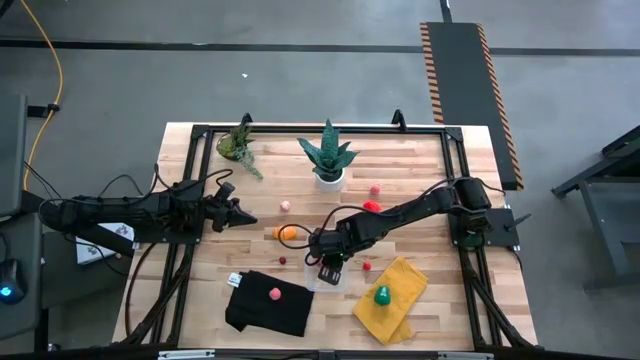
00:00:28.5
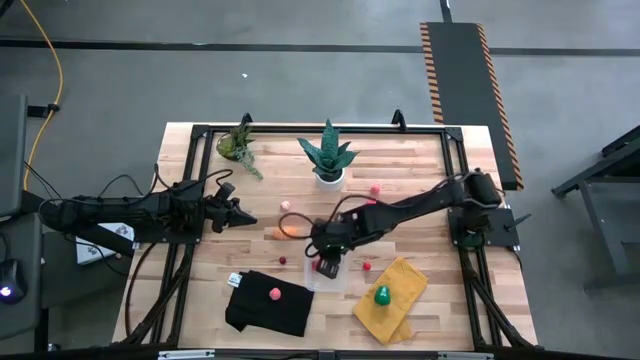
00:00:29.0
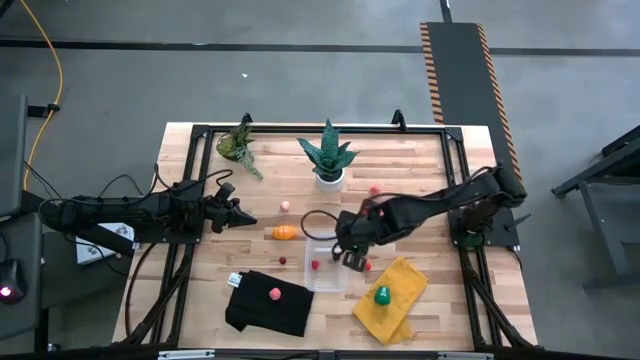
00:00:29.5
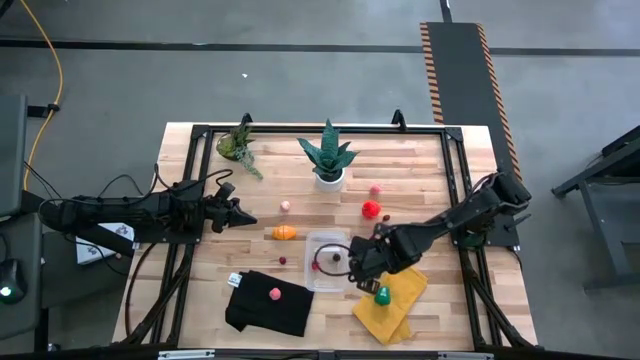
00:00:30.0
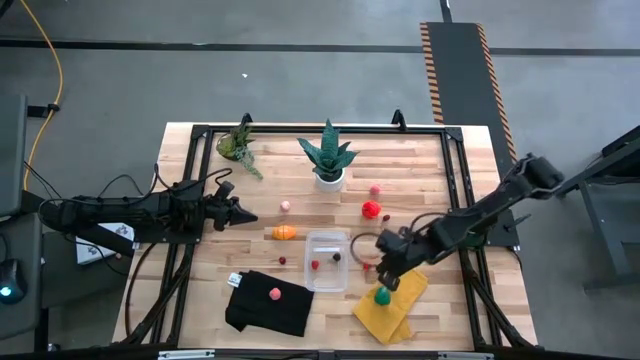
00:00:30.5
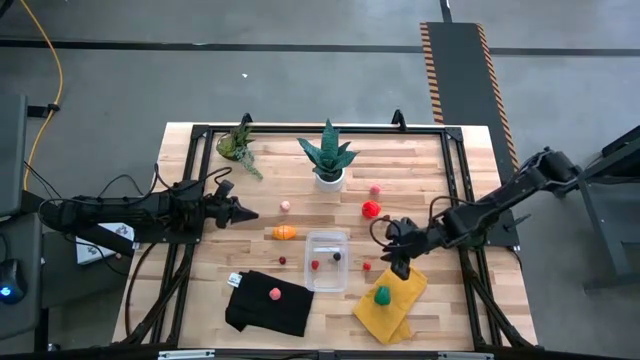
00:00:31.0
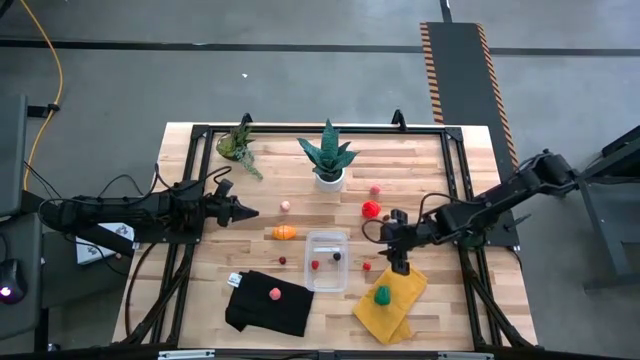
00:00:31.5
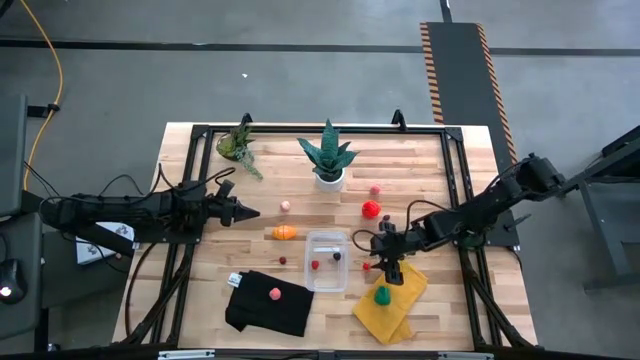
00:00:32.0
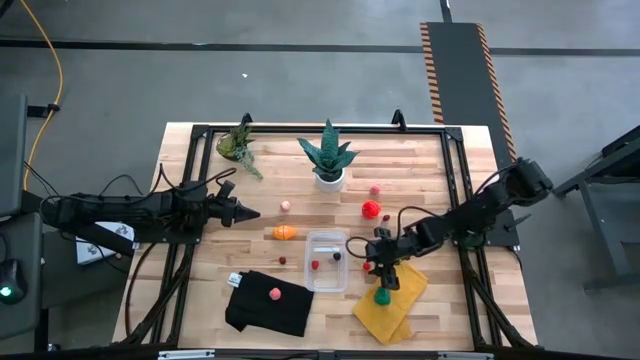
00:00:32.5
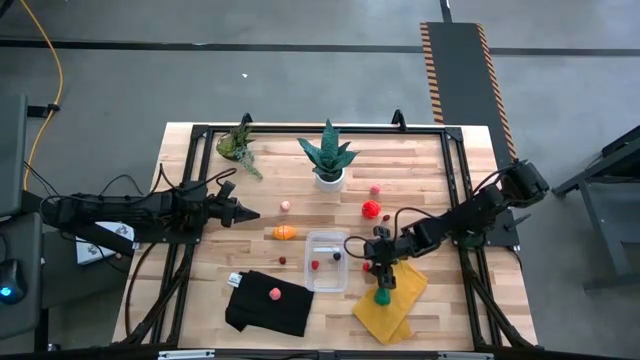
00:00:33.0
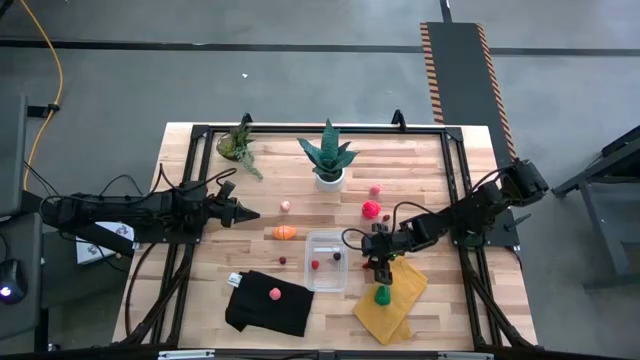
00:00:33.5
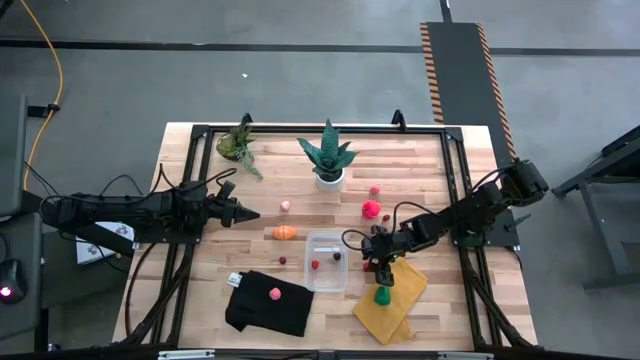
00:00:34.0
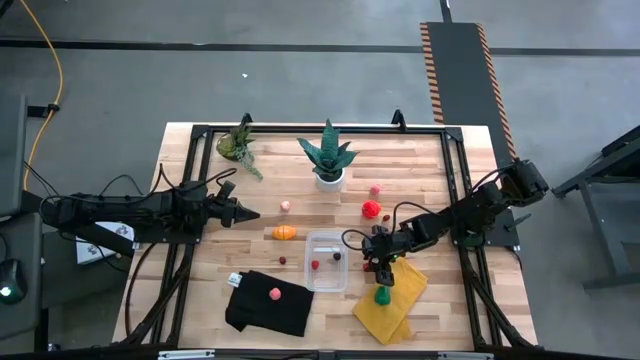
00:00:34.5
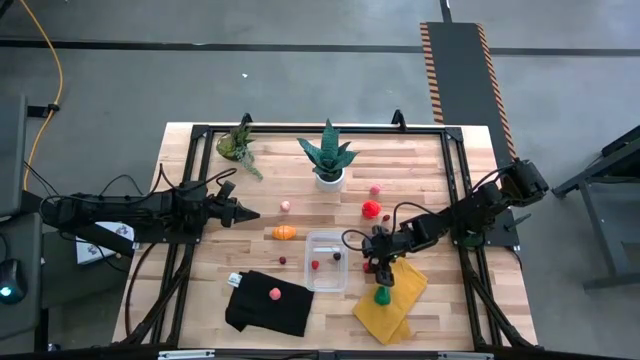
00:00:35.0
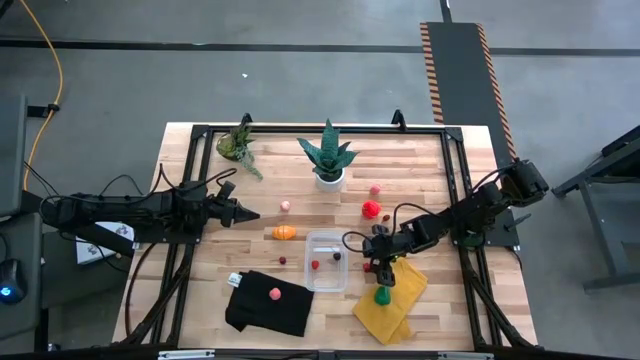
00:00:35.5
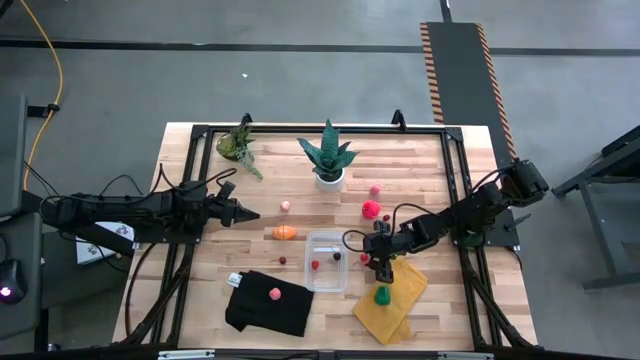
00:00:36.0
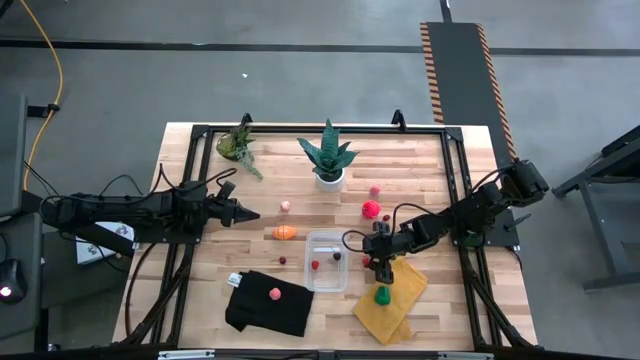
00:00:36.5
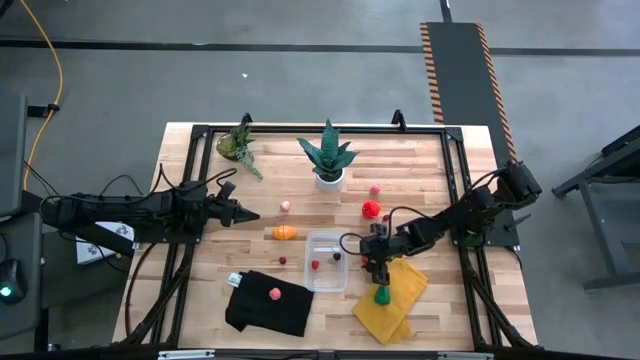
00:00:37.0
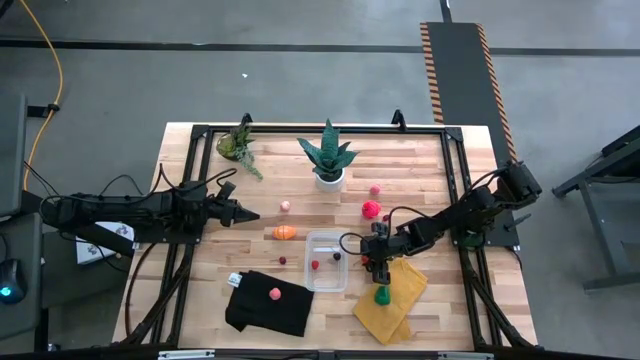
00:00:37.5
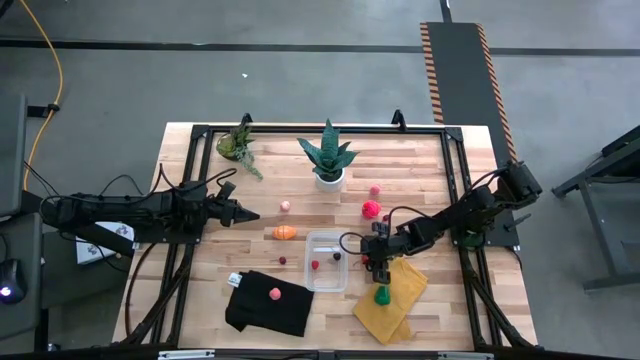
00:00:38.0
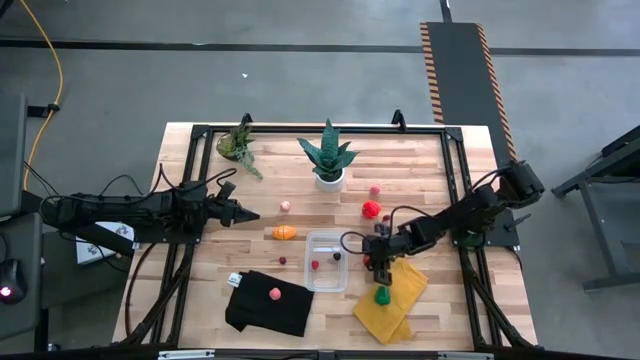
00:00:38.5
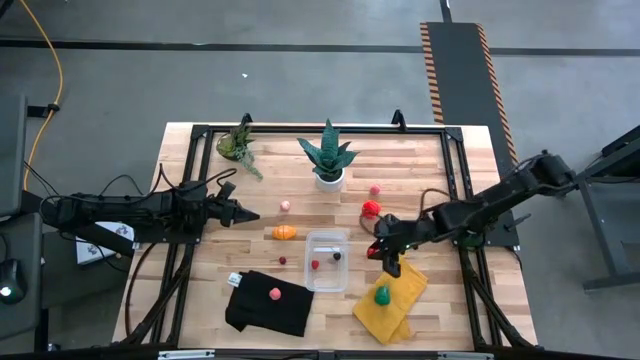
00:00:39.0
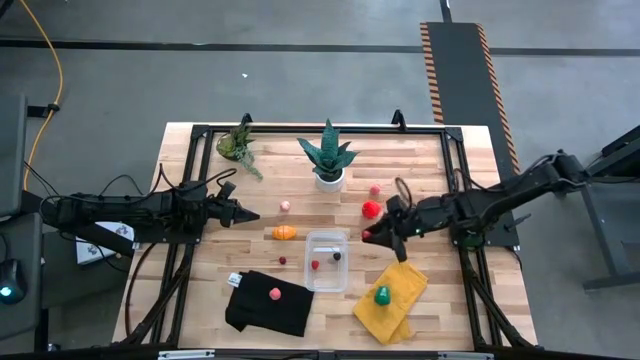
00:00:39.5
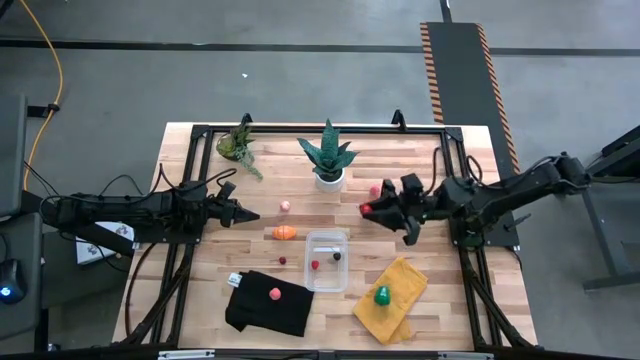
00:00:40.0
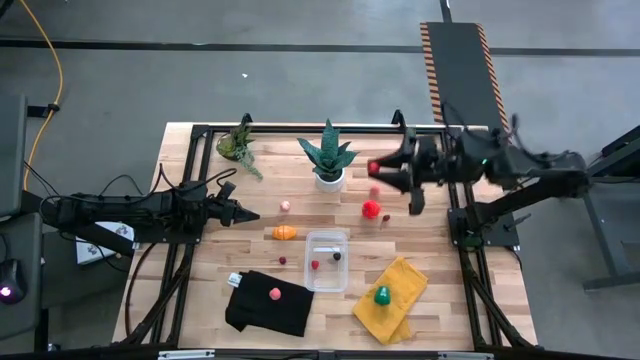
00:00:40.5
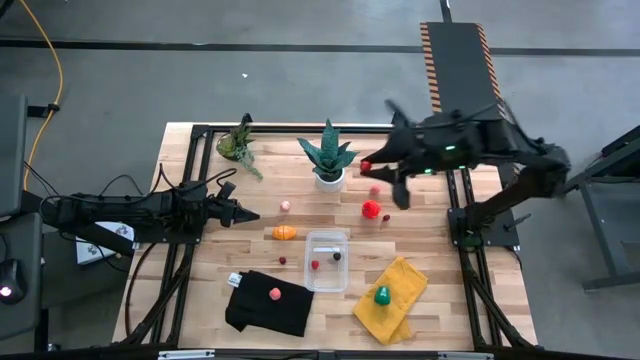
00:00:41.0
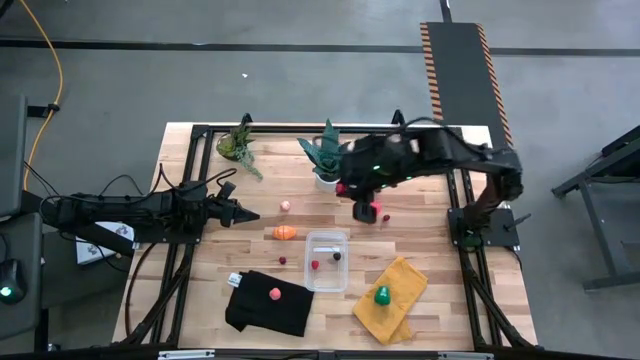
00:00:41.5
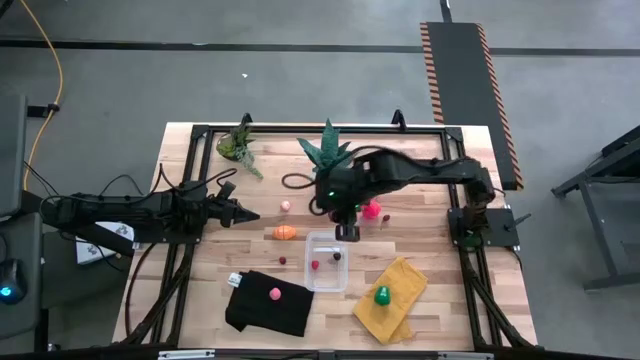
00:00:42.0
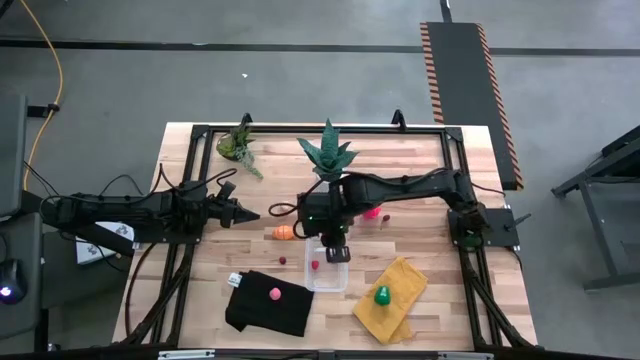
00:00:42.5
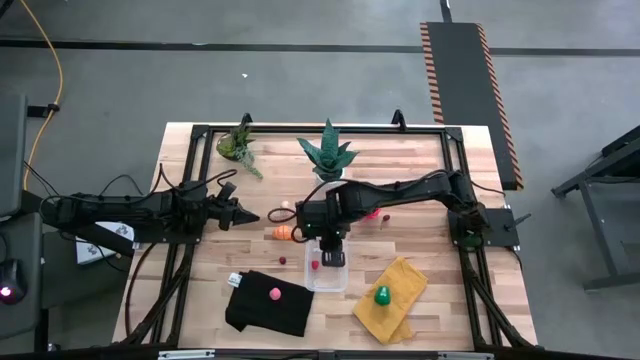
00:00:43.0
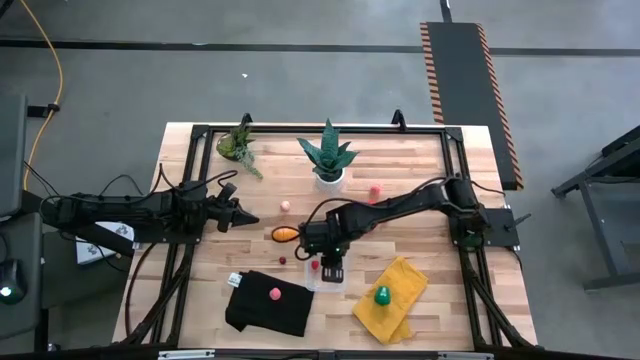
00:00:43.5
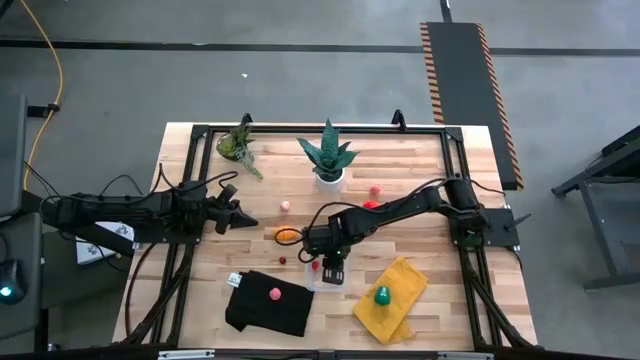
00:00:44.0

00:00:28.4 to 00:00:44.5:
Task: Pick and placing Produce into tupperware
Put the bottom right cherry into the transparent container
